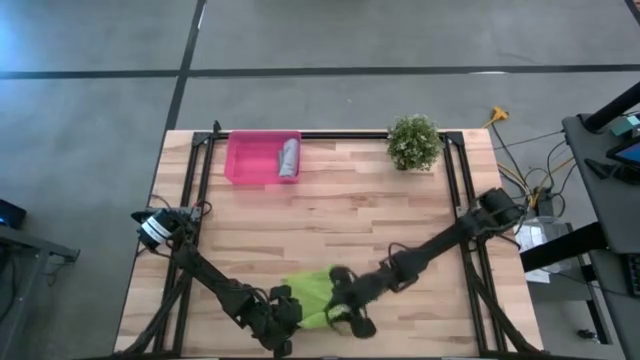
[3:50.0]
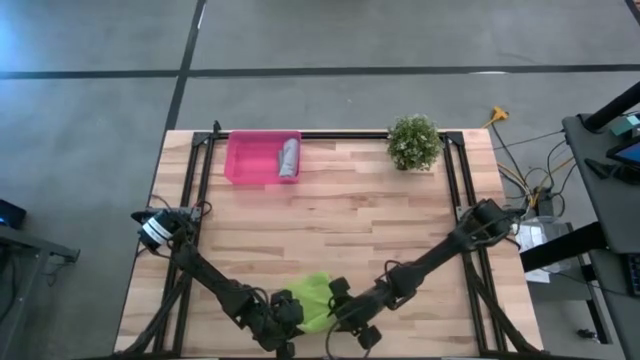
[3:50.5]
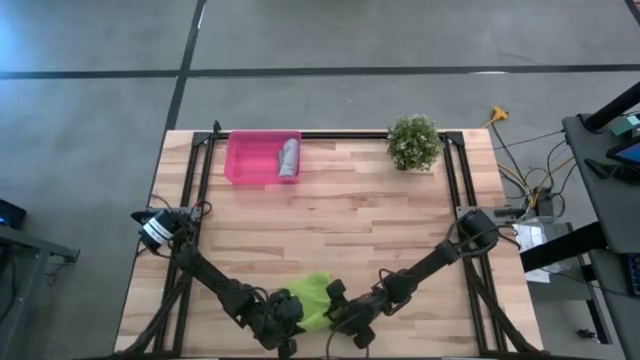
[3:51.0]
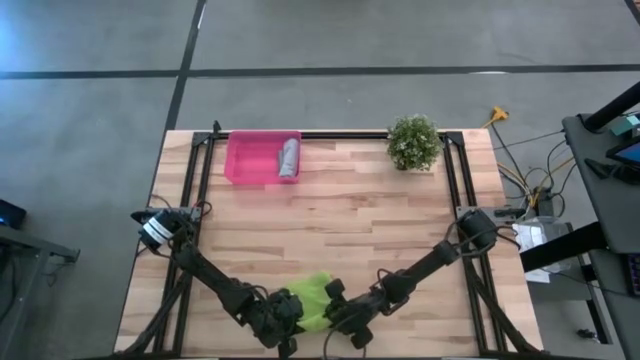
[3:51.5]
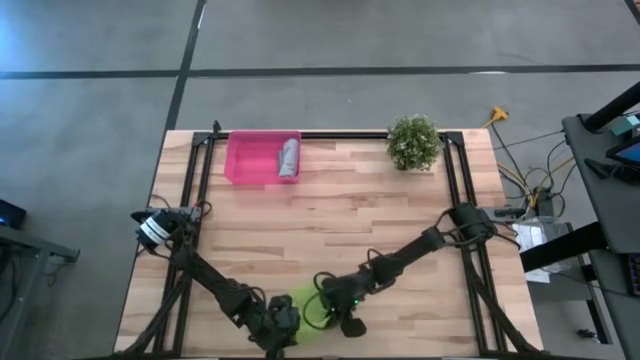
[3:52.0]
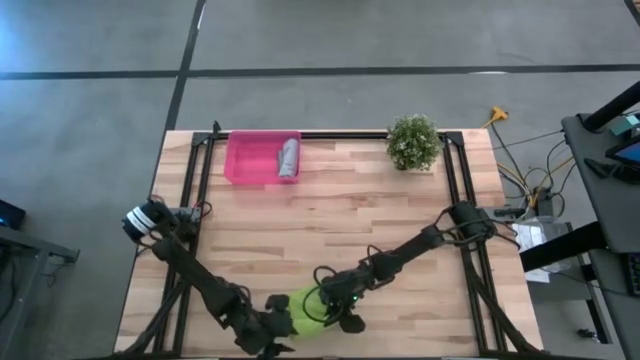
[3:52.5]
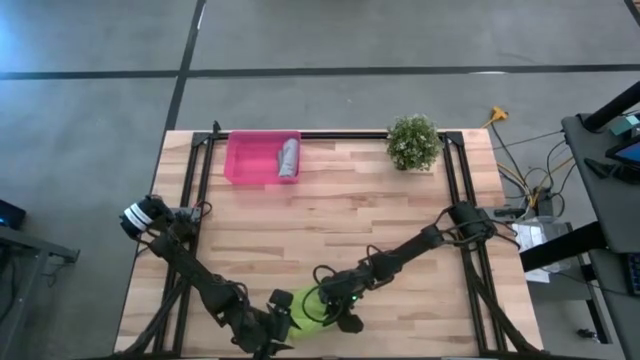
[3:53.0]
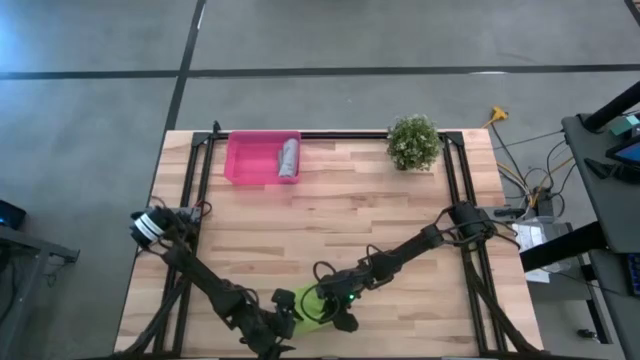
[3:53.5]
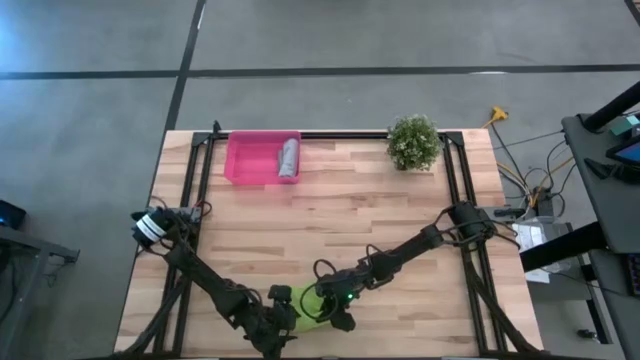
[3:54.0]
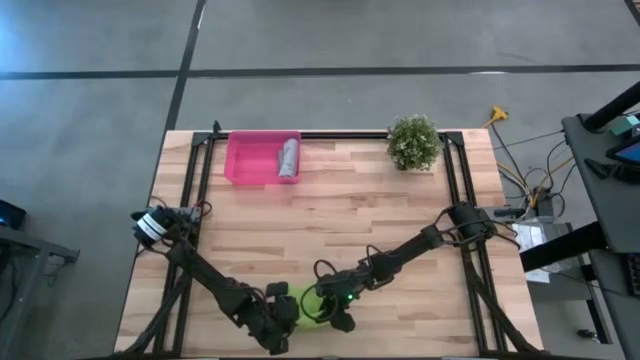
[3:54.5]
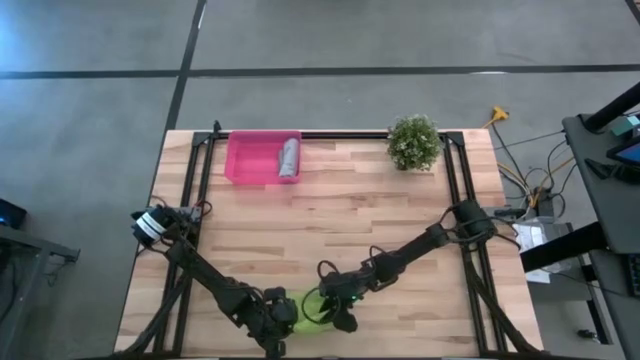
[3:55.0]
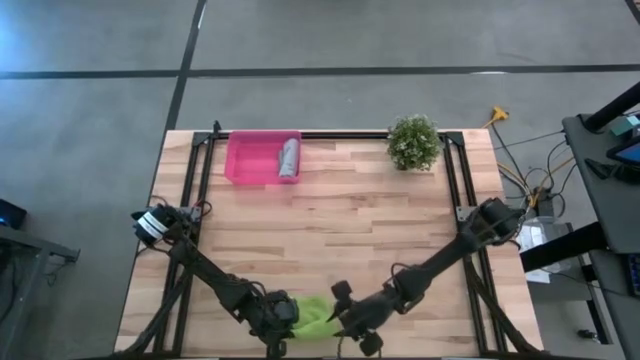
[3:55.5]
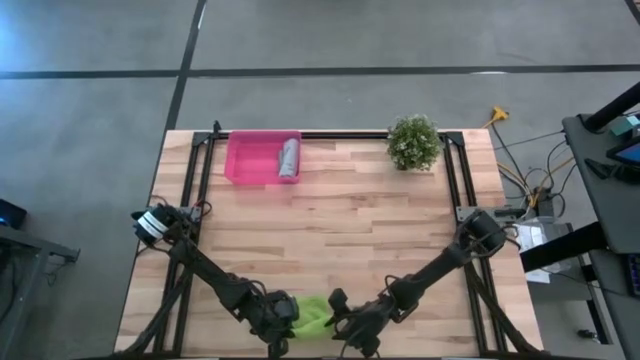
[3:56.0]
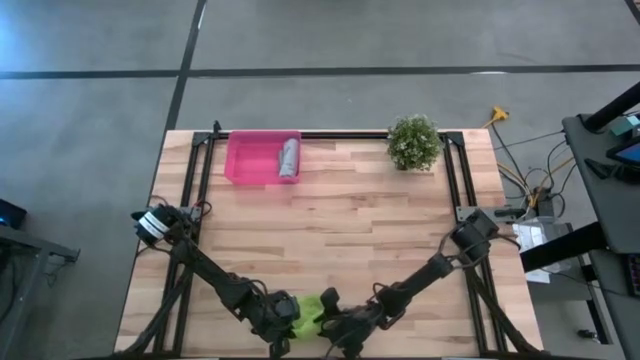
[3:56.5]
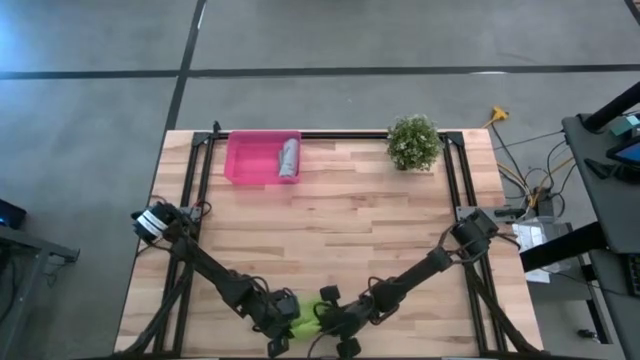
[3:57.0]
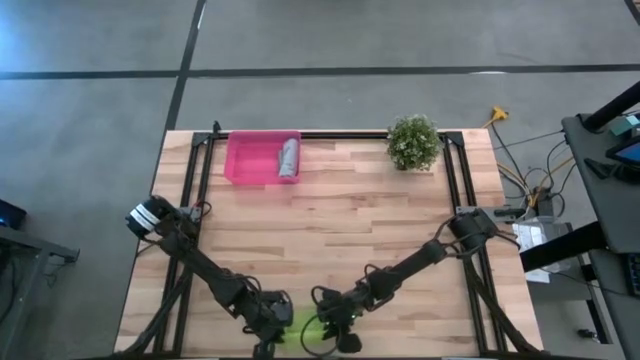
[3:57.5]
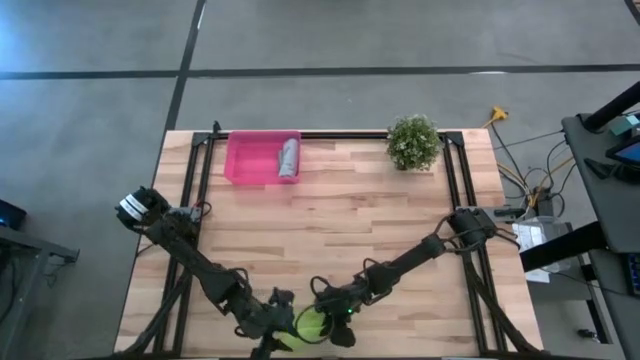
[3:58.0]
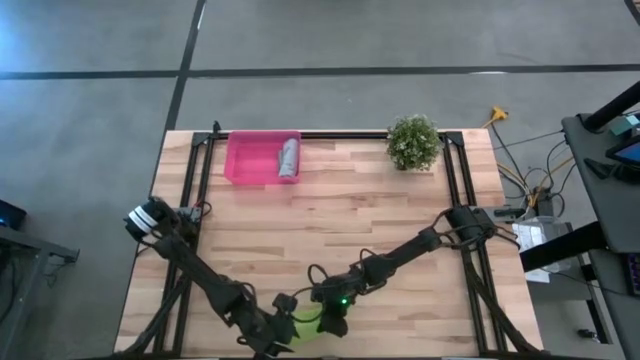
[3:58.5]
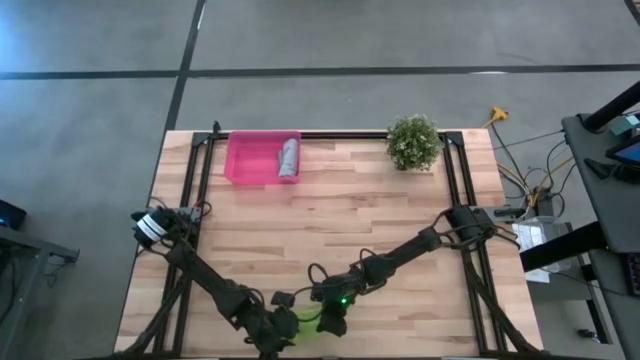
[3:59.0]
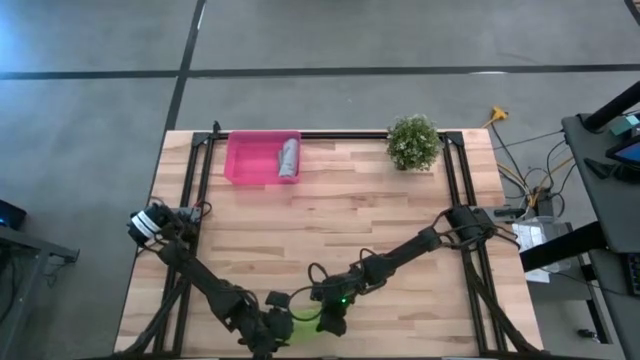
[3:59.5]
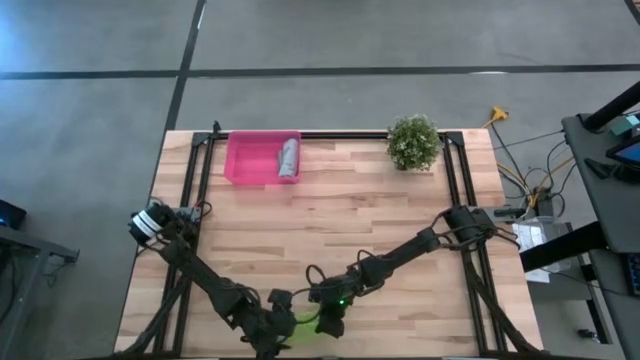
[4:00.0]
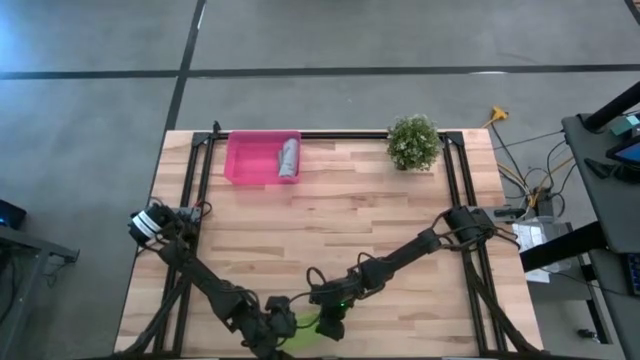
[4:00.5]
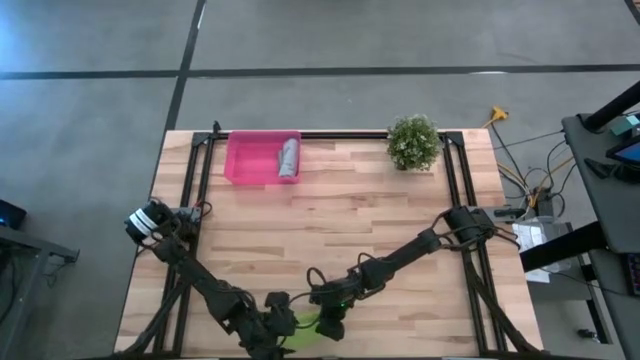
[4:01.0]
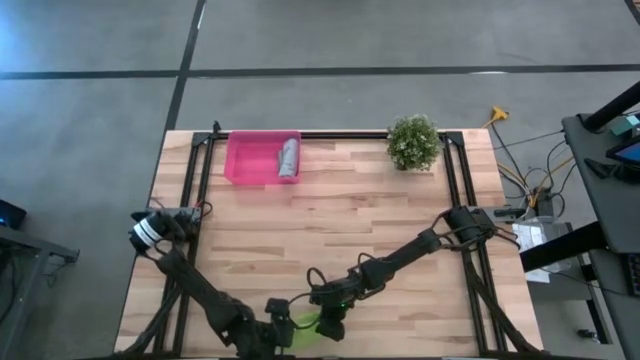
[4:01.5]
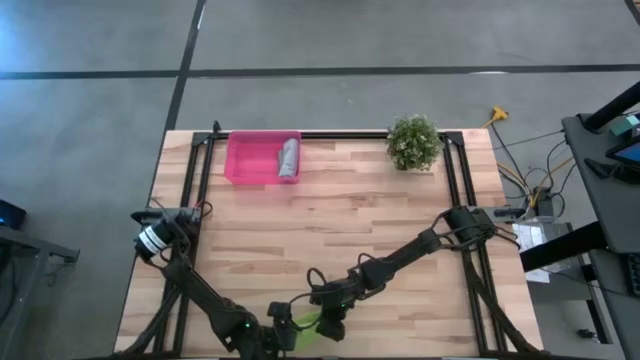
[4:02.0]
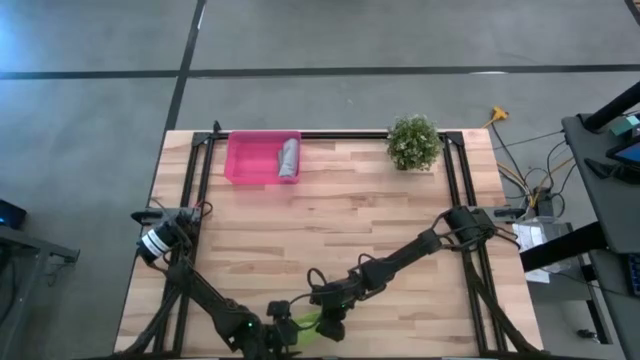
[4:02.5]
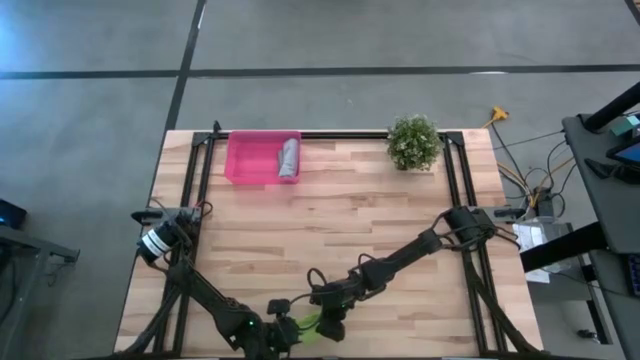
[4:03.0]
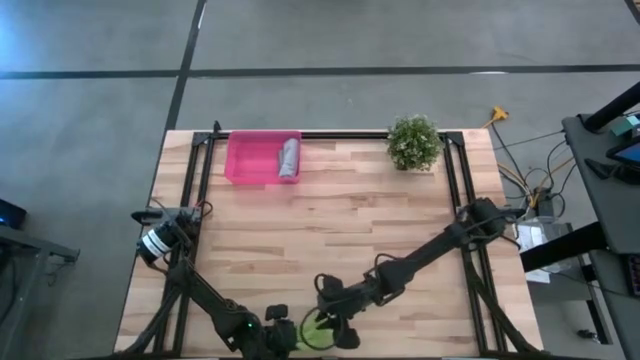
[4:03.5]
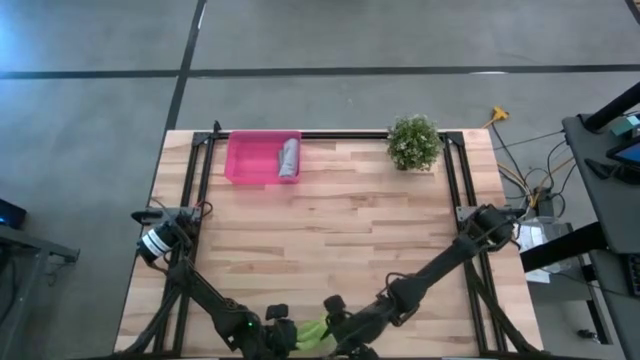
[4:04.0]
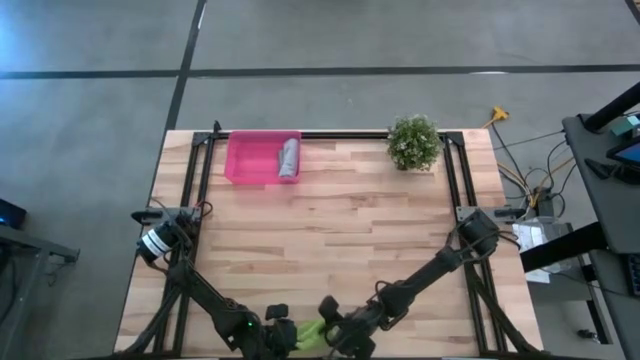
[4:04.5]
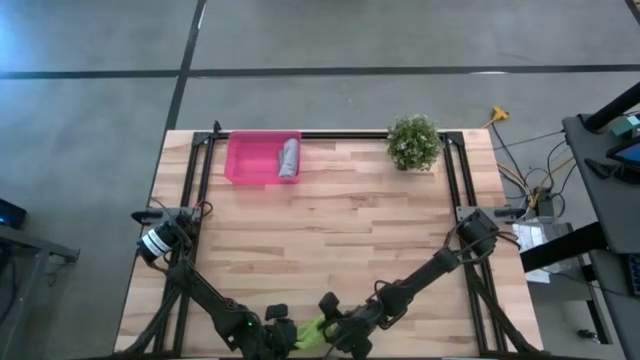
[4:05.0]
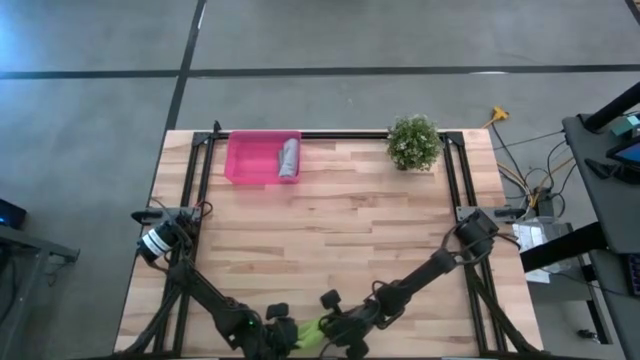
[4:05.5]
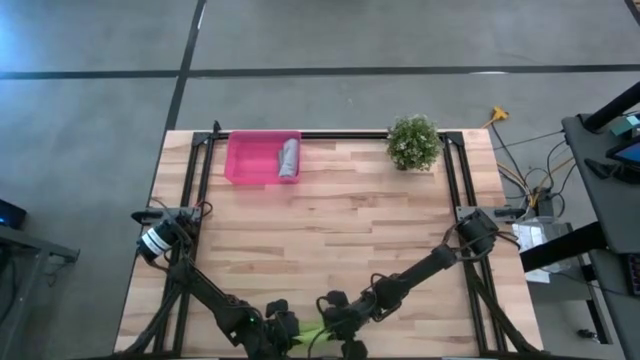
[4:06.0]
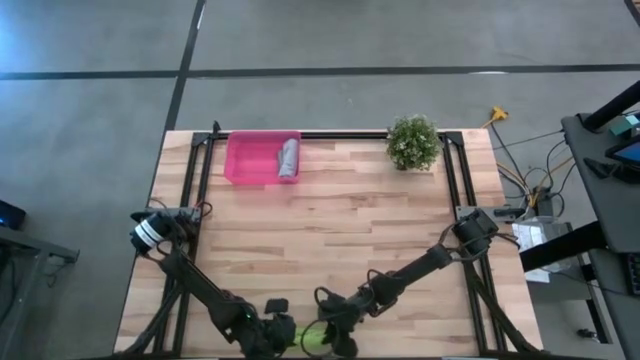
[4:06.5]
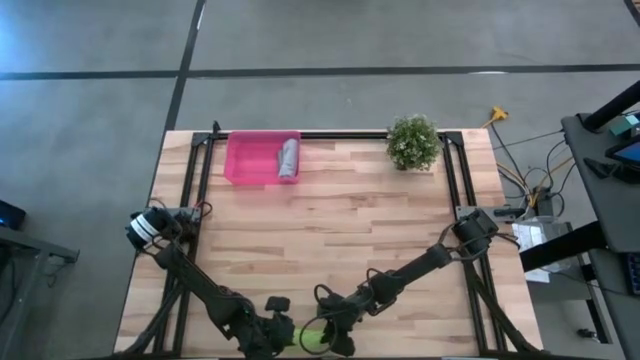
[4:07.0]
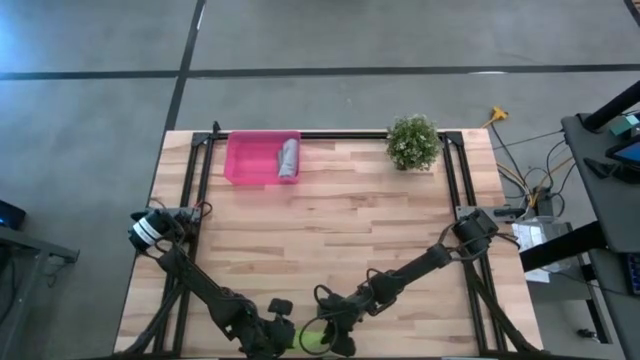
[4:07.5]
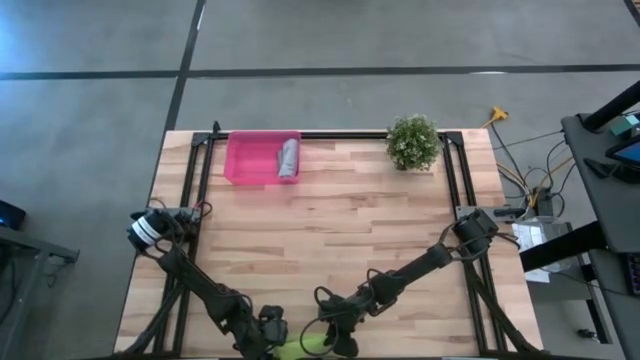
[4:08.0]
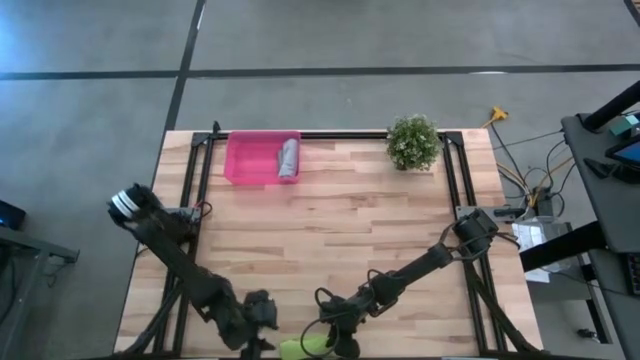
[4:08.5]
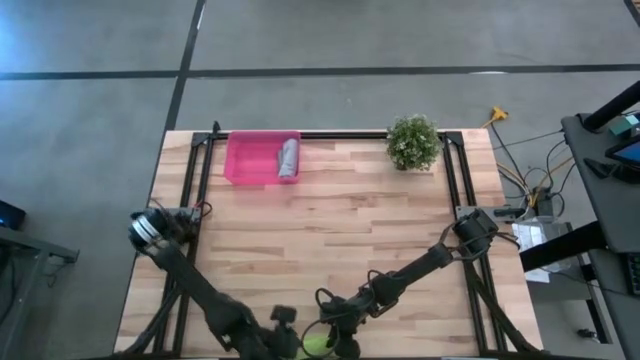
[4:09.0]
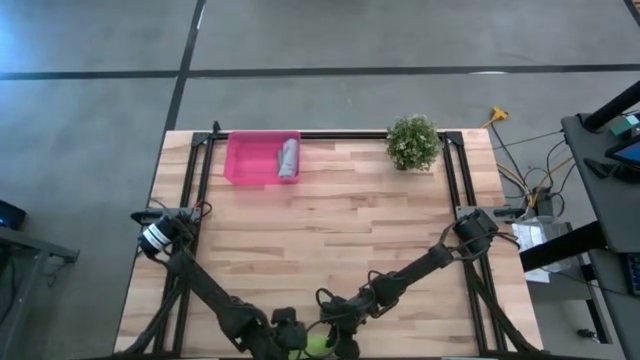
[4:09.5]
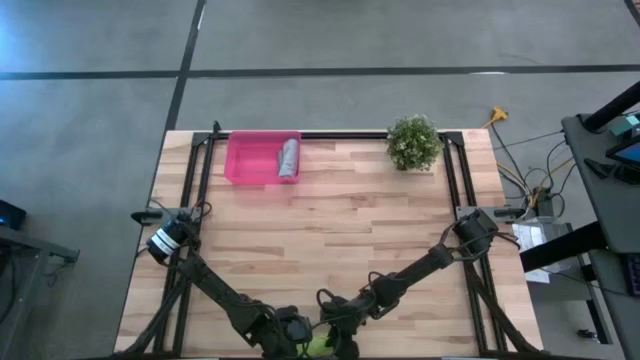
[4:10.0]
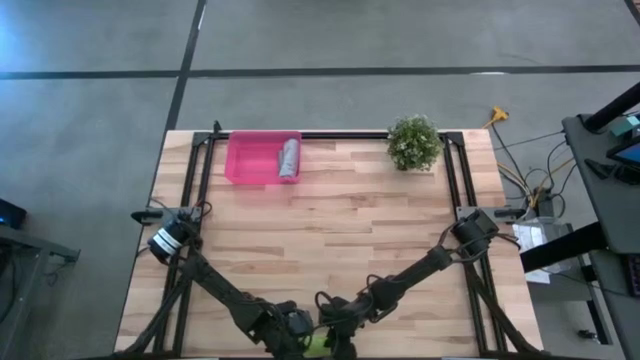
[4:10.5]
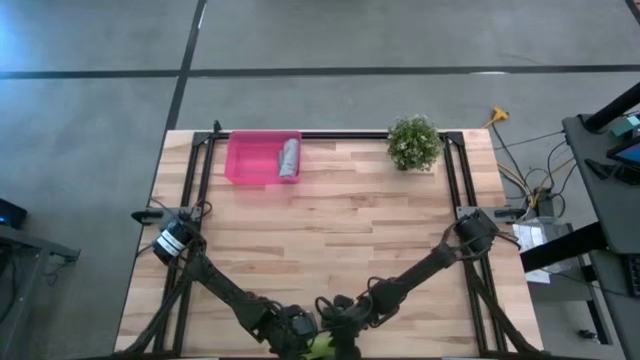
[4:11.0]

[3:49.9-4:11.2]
Task: Roll microfiber towels into tight, uniform cylinder then place into a basket
Roll the green microfiber cloth

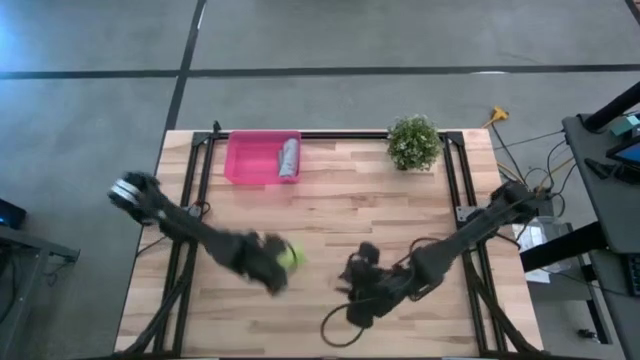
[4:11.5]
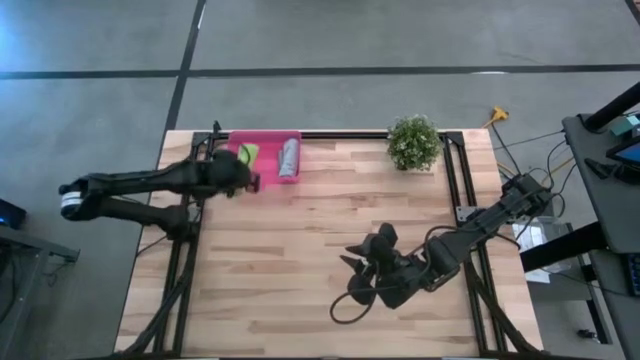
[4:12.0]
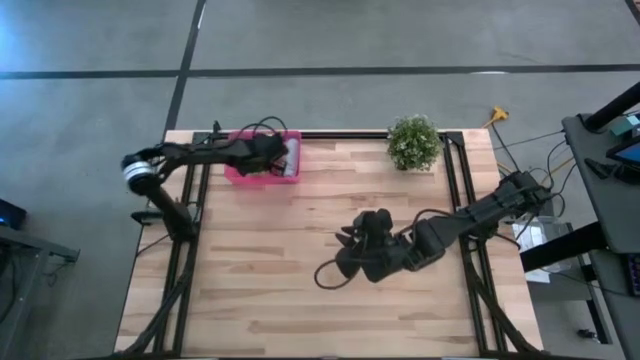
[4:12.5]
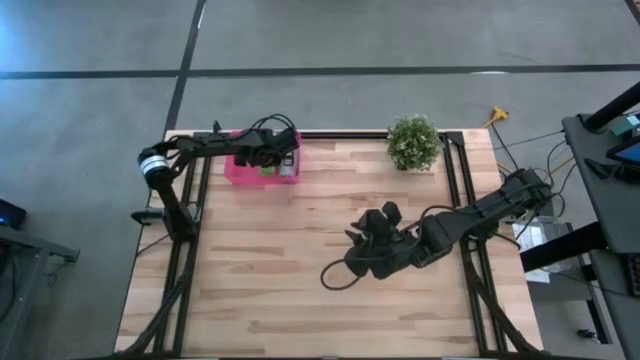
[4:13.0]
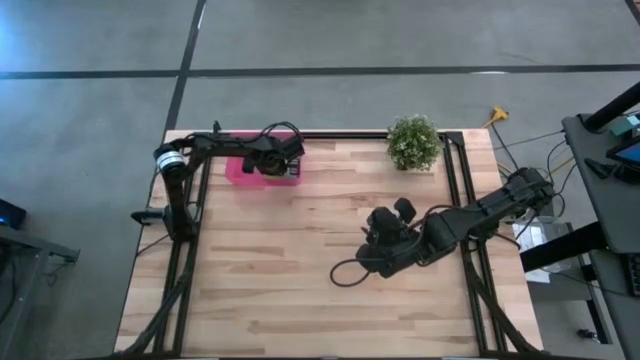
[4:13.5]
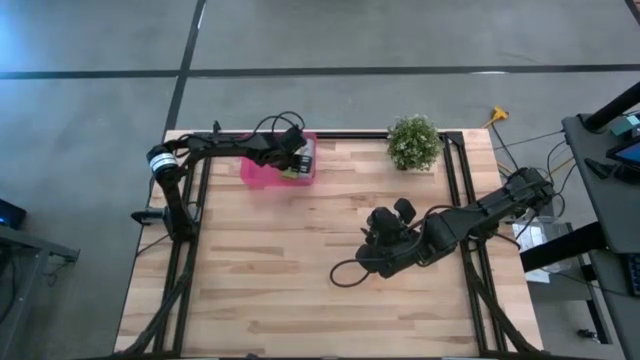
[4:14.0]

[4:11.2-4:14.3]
Put the green microfiber cloth into the pink bin
